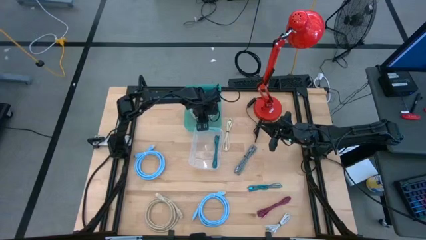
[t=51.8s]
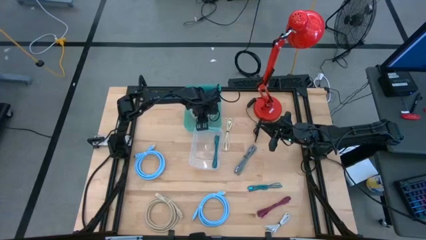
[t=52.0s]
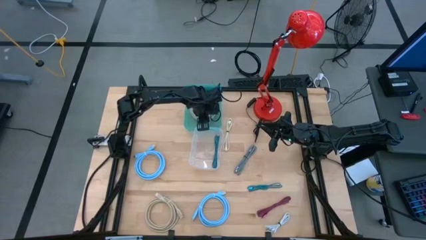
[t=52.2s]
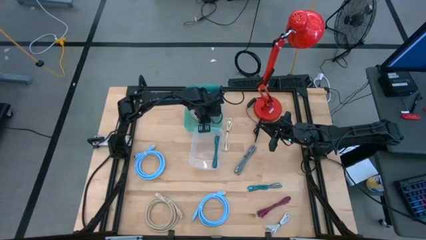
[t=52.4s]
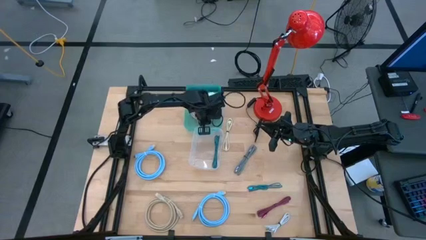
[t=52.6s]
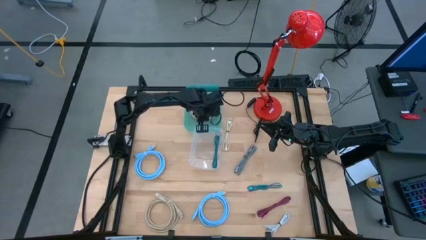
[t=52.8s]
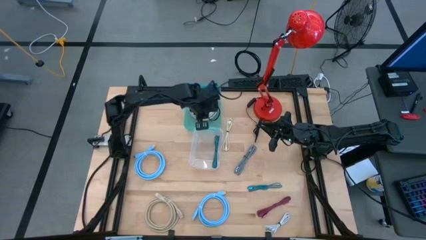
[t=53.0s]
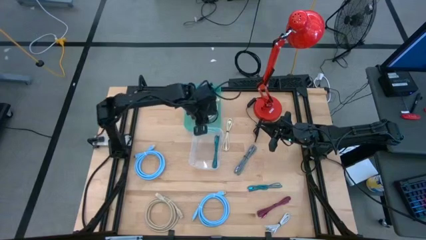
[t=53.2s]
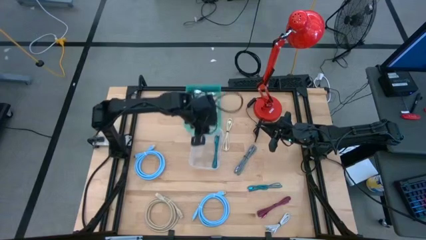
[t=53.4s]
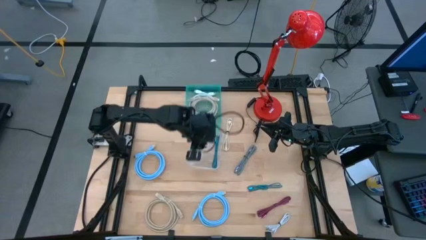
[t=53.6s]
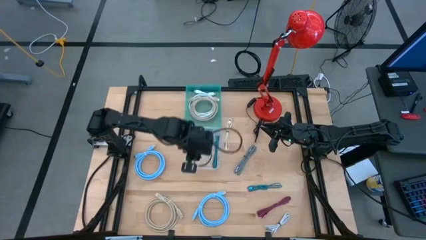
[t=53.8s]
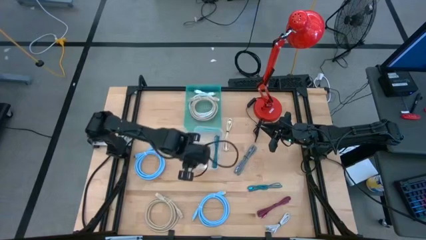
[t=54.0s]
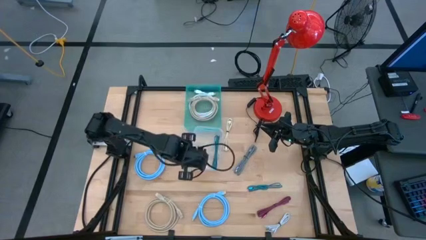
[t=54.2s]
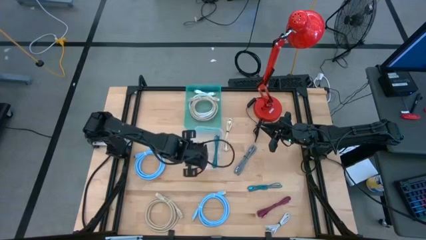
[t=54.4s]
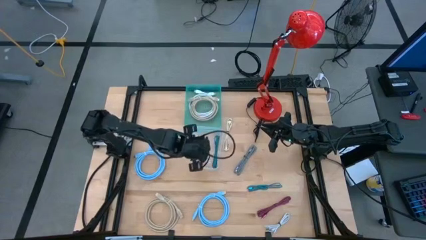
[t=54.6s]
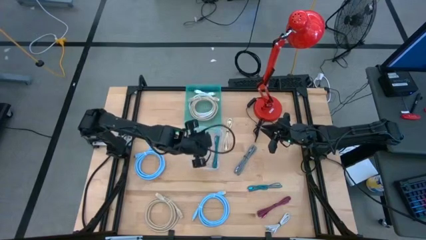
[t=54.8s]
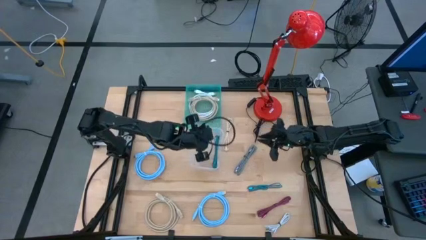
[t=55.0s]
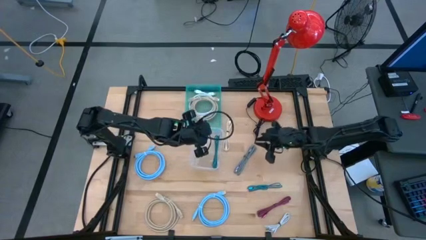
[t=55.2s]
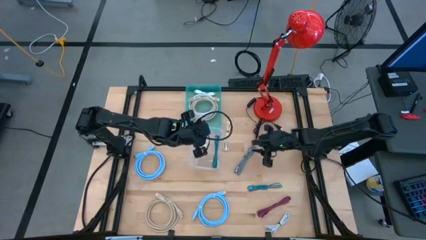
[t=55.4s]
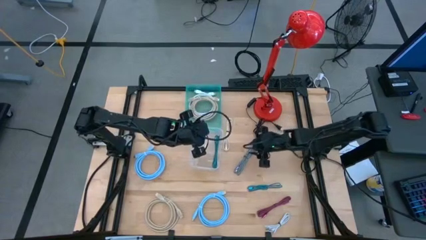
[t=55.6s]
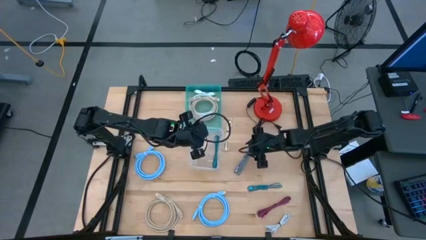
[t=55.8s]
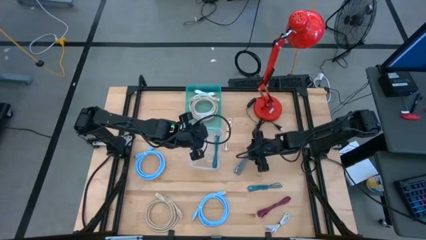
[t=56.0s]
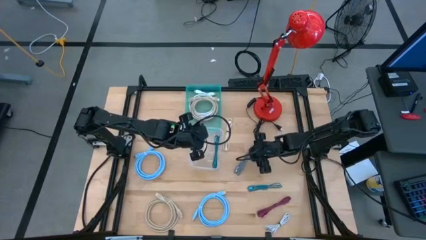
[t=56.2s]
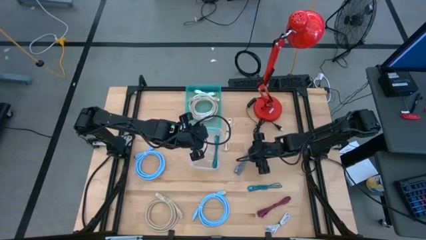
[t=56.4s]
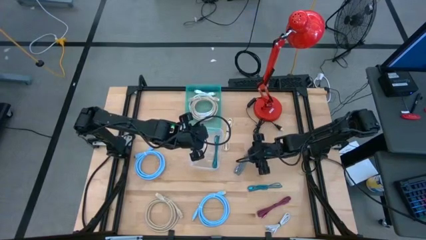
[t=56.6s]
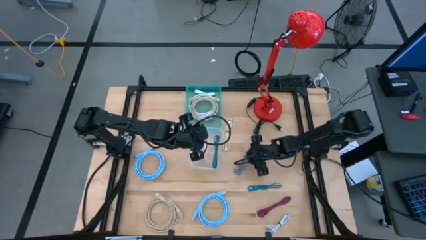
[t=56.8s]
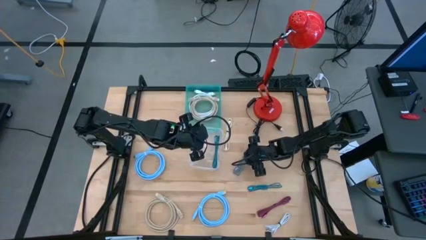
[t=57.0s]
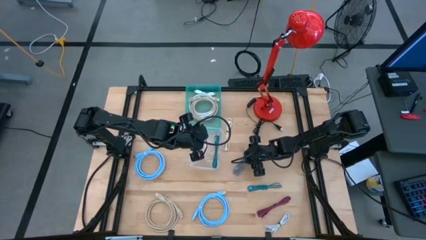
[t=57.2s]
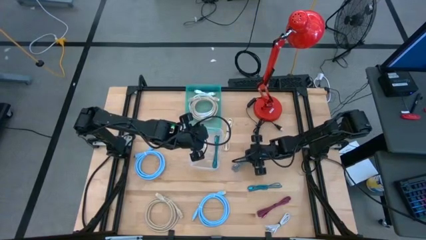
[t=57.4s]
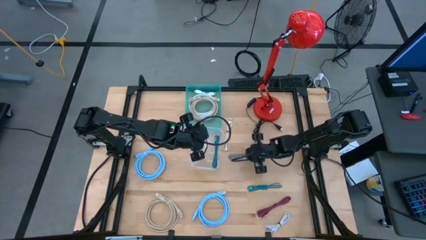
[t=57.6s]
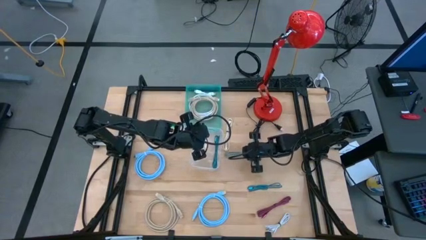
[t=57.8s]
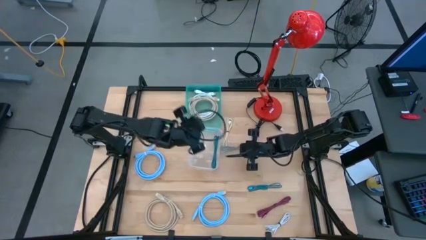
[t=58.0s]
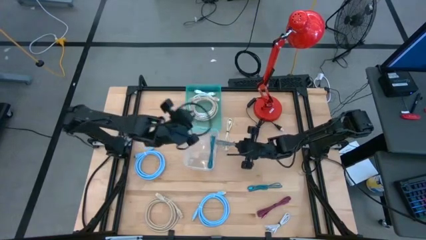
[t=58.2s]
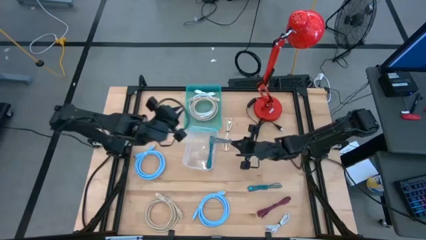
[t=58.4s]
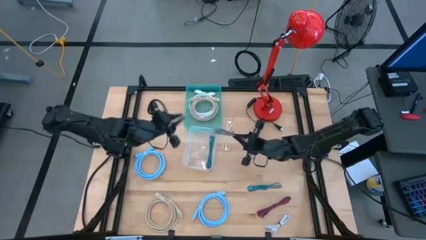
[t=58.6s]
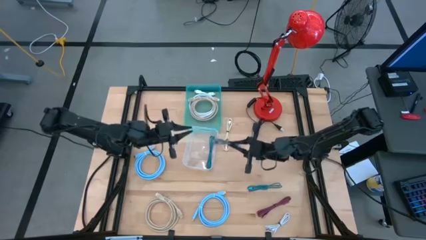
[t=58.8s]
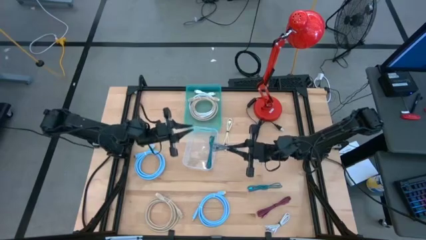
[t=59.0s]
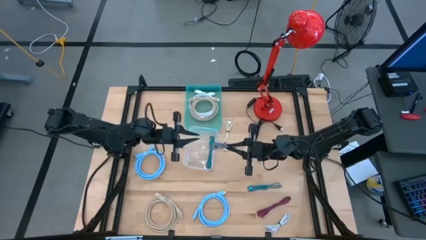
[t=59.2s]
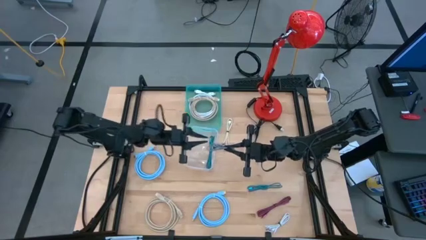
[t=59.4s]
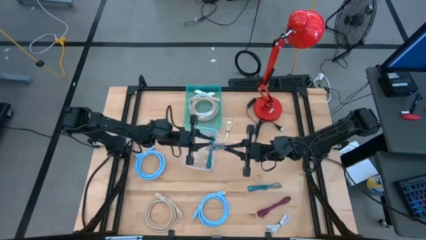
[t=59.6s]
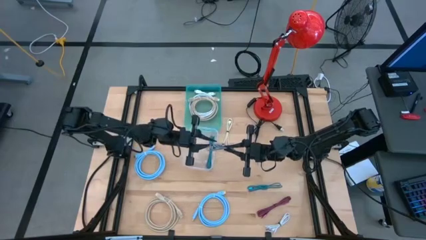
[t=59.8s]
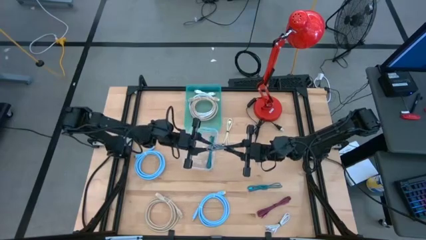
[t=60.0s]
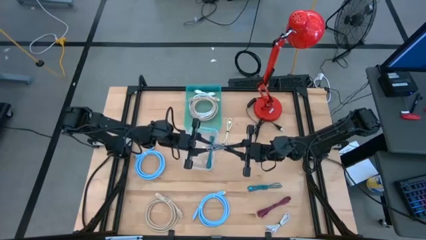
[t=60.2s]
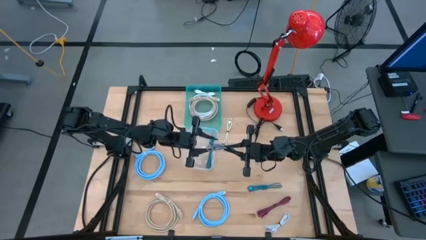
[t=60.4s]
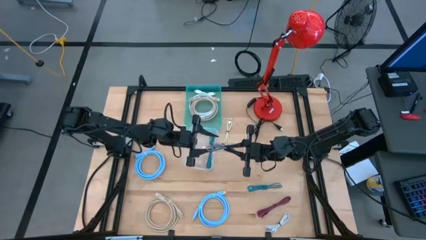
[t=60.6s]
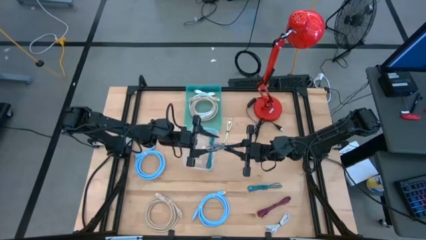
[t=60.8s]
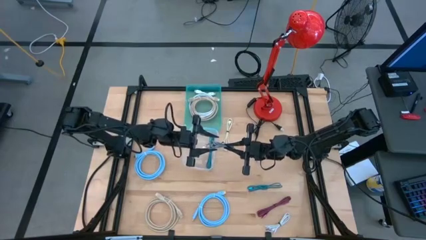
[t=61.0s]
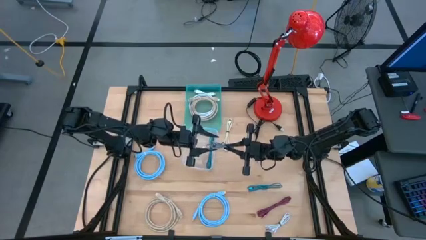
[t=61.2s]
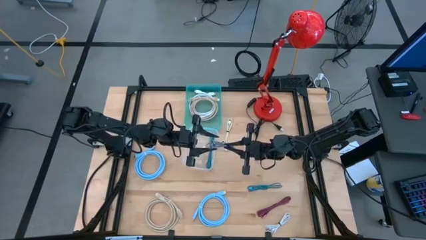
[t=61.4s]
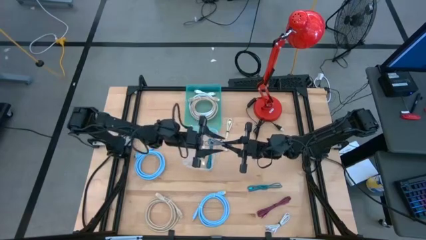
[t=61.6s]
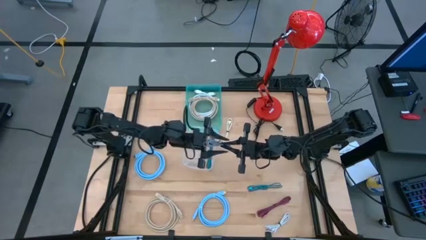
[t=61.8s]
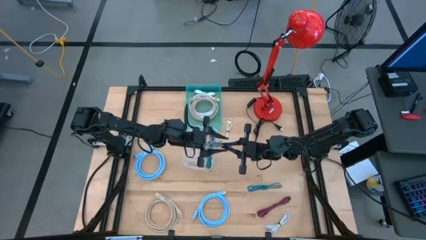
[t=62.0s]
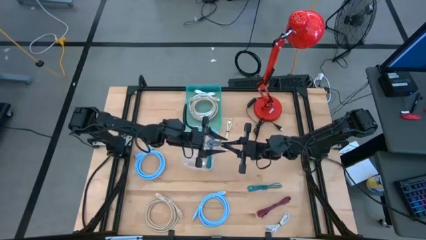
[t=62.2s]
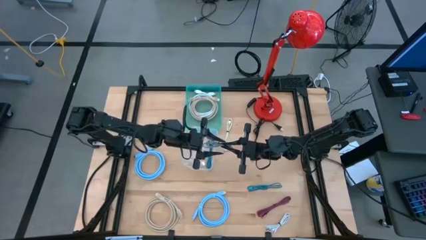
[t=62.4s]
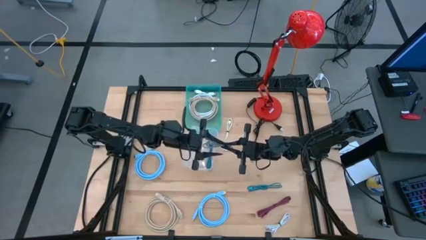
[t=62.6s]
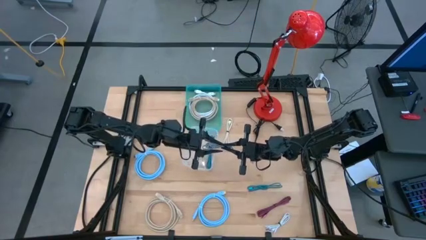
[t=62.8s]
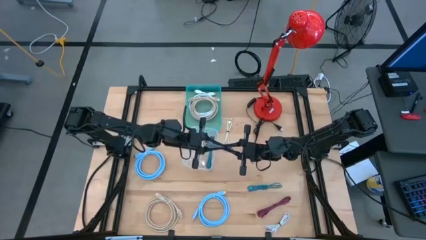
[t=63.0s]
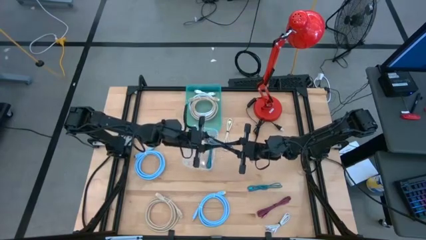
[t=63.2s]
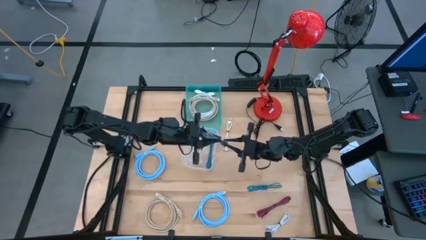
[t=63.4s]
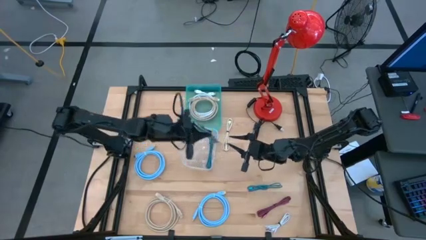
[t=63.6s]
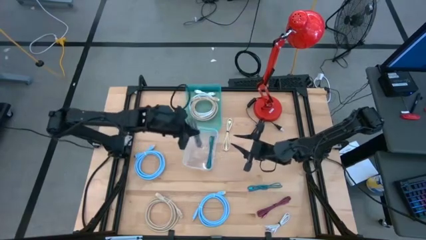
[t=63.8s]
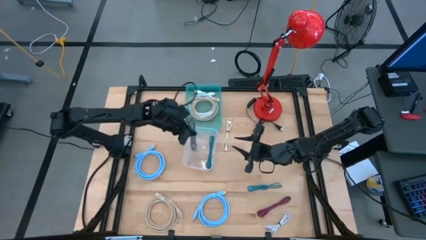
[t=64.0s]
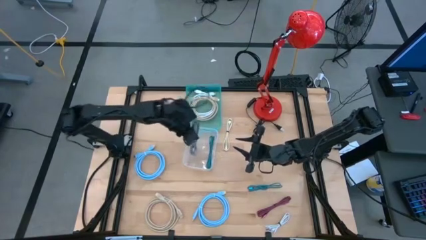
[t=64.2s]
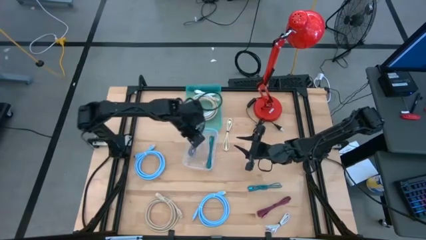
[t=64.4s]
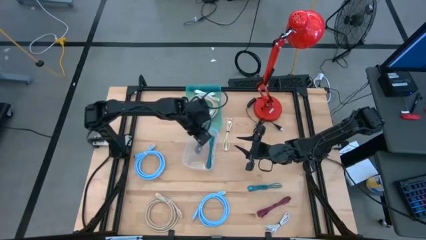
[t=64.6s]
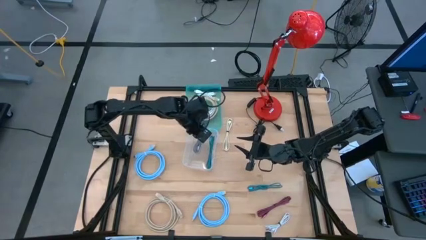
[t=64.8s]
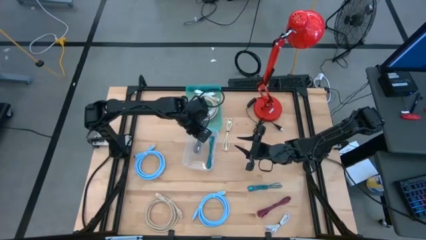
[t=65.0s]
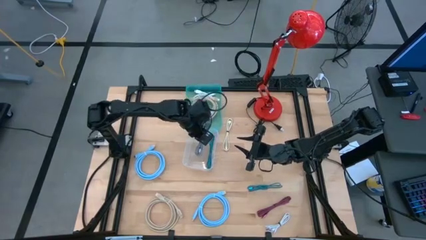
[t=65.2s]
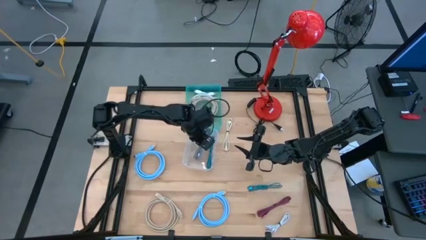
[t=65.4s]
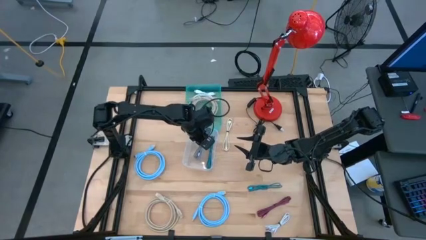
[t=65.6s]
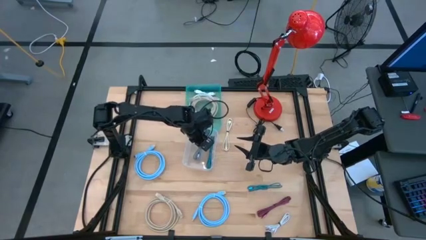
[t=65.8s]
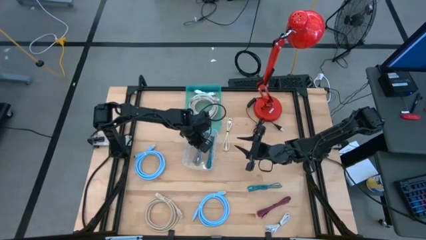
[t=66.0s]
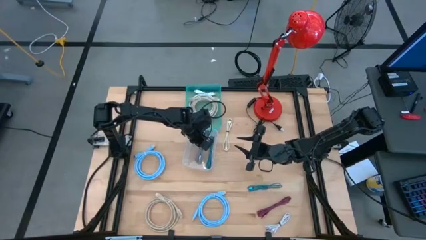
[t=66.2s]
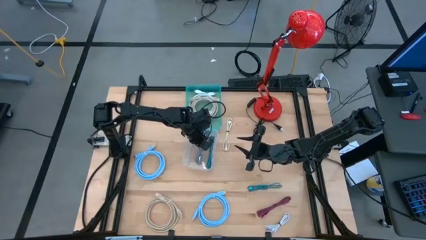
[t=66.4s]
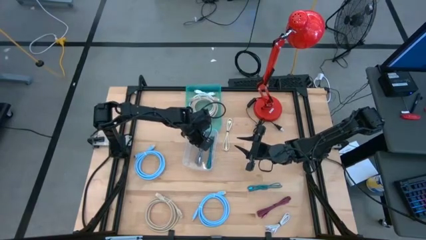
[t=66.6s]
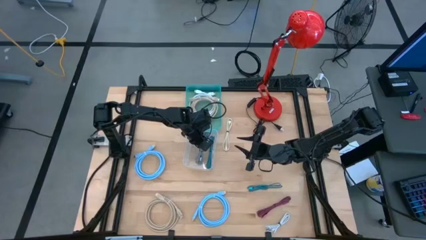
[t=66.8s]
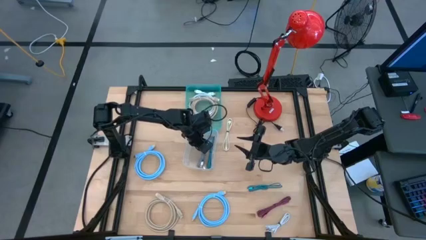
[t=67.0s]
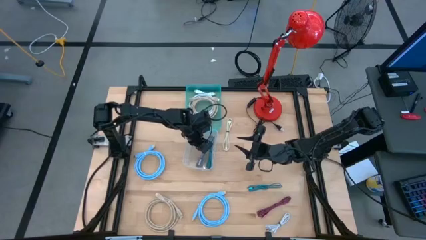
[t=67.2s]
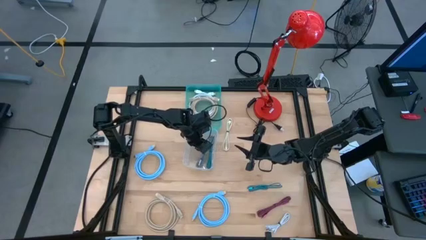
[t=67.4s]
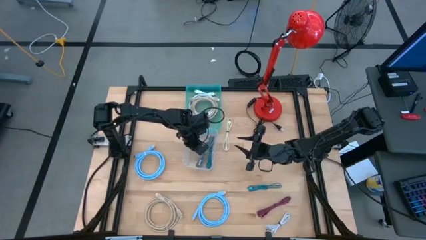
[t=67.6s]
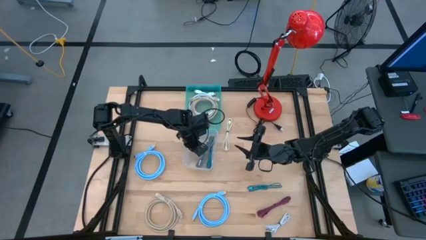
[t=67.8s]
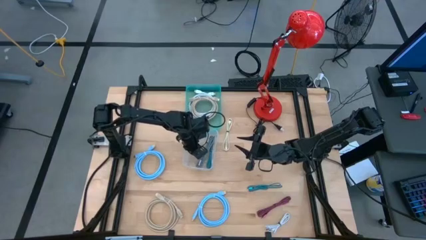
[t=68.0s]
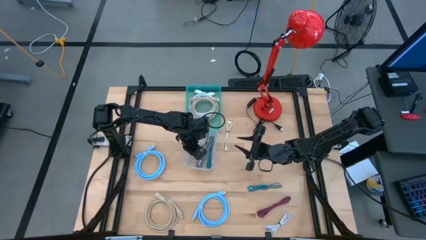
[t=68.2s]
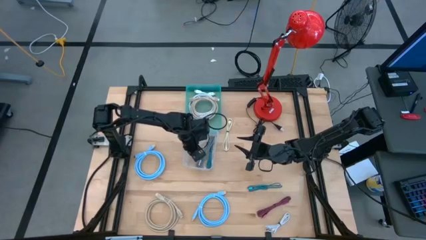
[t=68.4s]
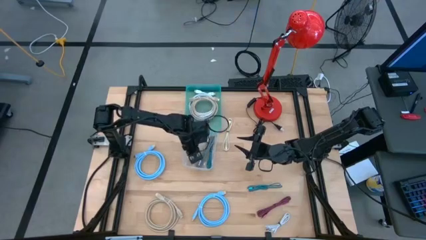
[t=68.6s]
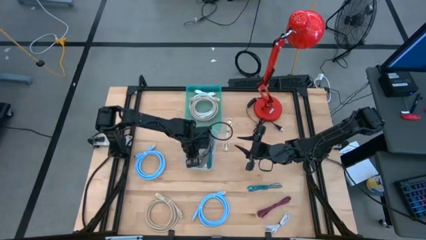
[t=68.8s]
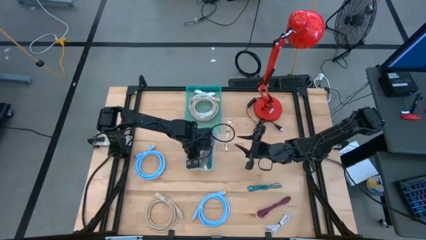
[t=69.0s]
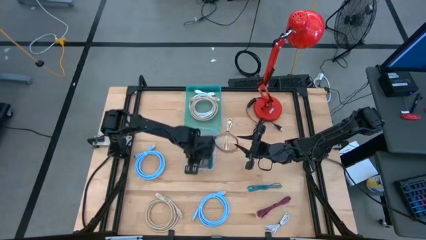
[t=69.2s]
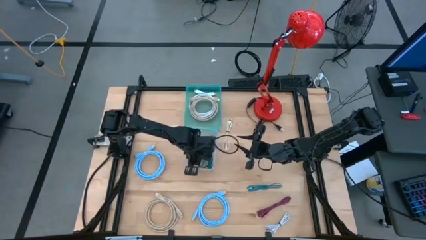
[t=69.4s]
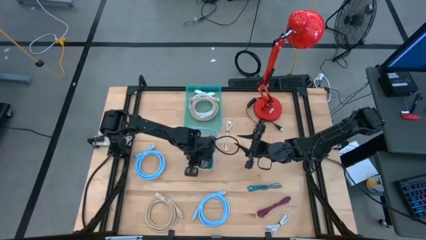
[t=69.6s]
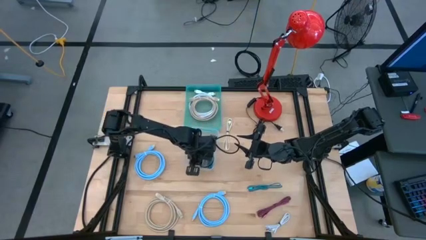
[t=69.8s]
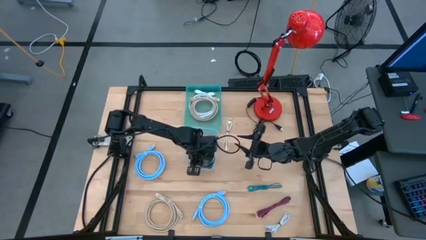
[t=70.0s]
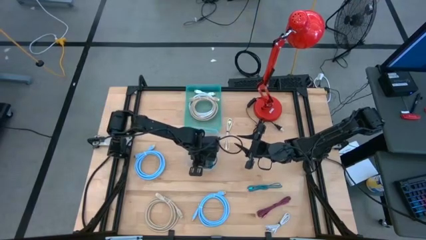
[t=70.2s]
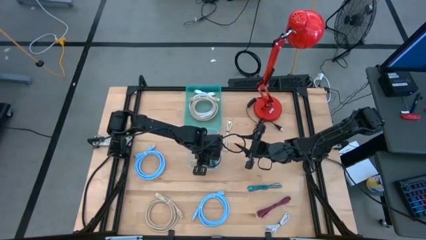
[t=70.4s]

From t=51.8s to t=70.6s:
Task: Pick & Place USB Port
Put the white black tied USB cable into the transparent bin
